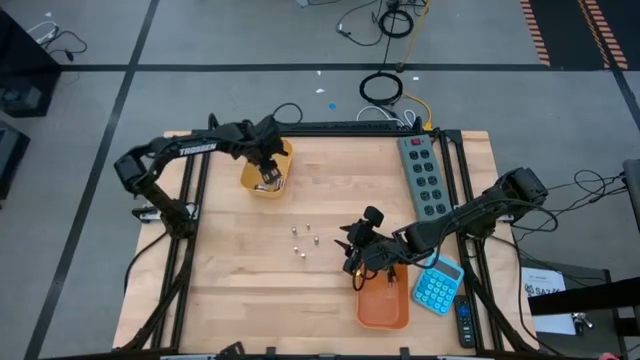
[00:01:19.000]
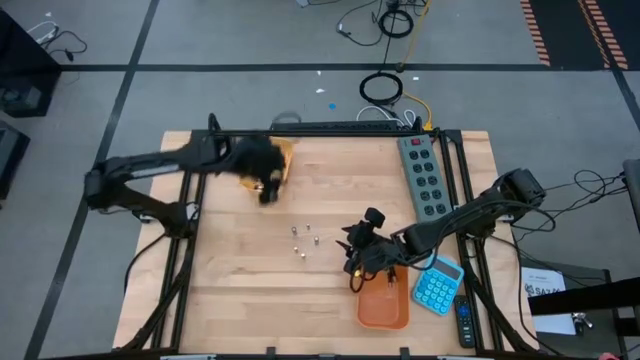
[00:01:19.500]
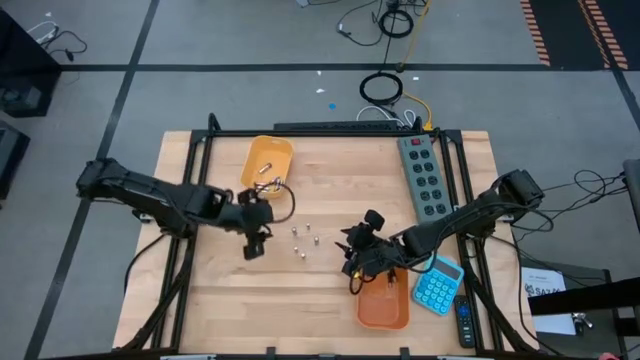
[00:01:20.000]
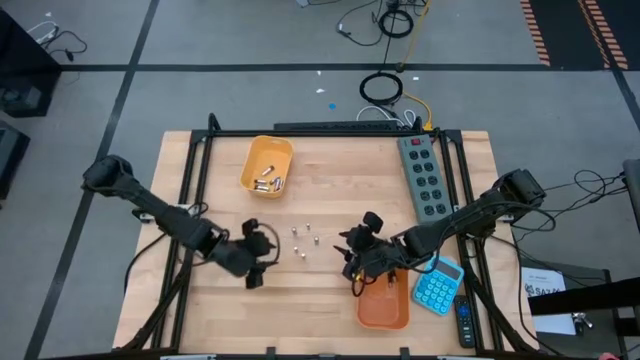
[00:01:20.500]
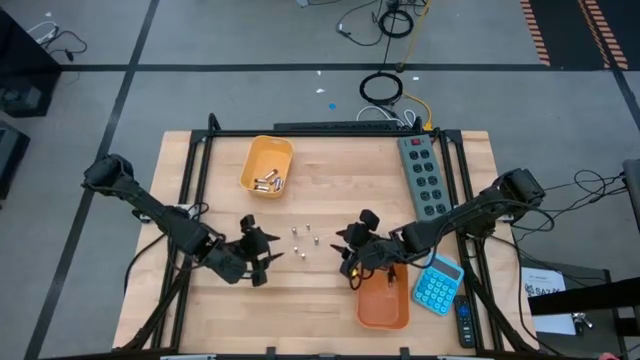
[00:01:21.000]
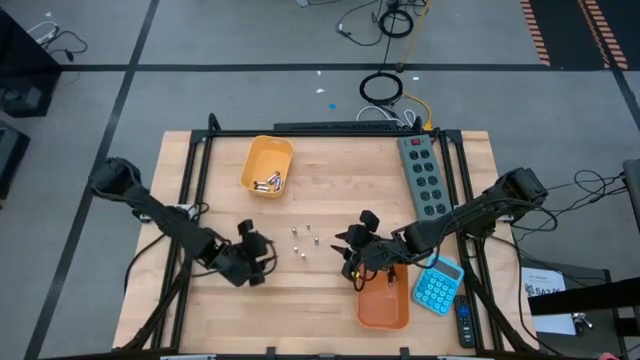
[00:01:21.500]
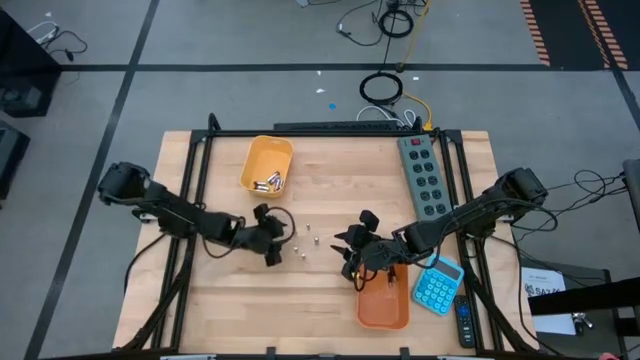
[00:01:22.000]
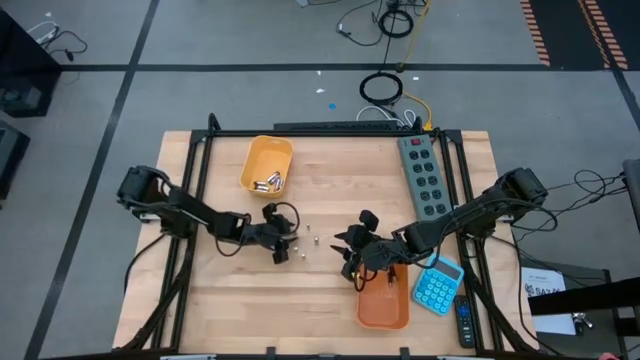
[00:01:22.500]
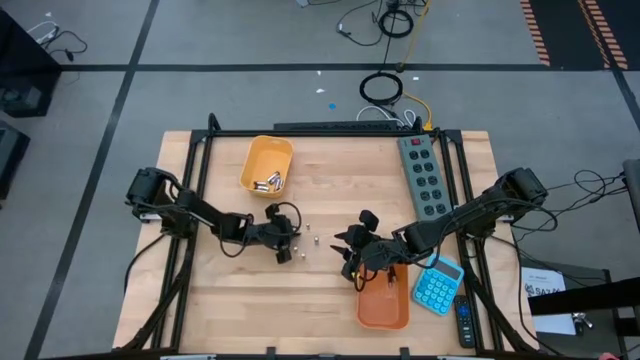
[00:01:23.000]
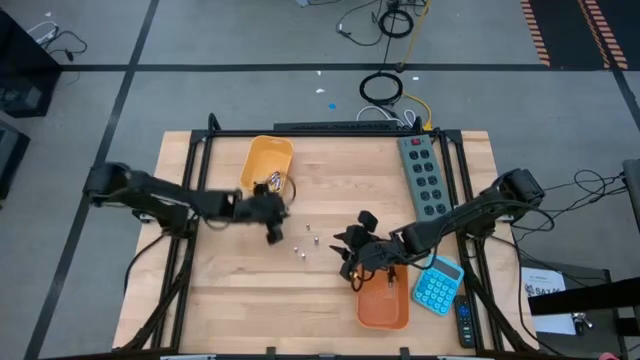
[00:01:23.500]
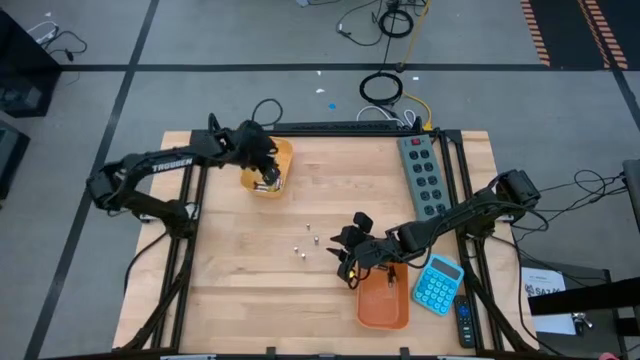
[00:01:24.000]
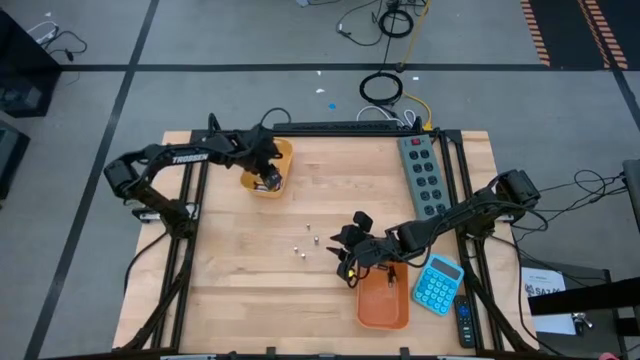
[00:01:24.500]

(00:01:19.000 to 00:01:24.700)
Task: Sort batteries
Put the silver battery into the yellow bin

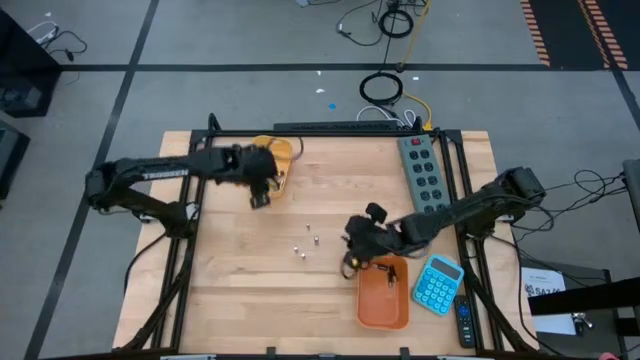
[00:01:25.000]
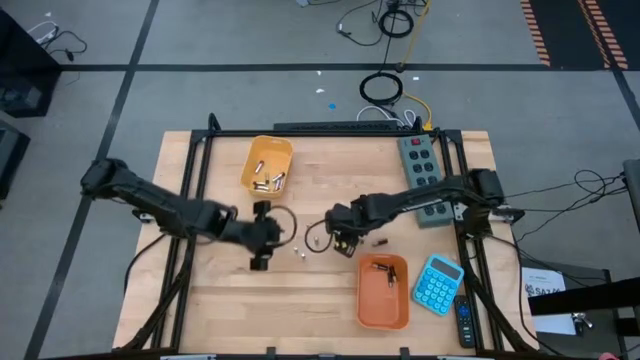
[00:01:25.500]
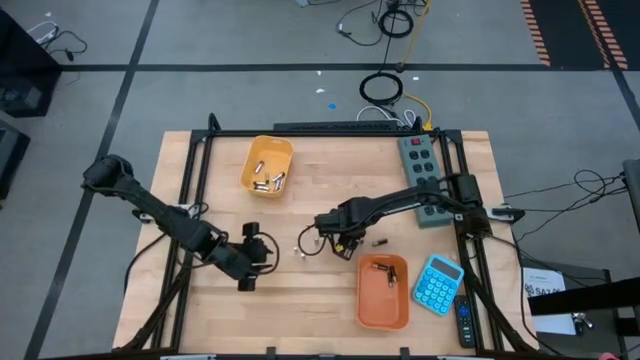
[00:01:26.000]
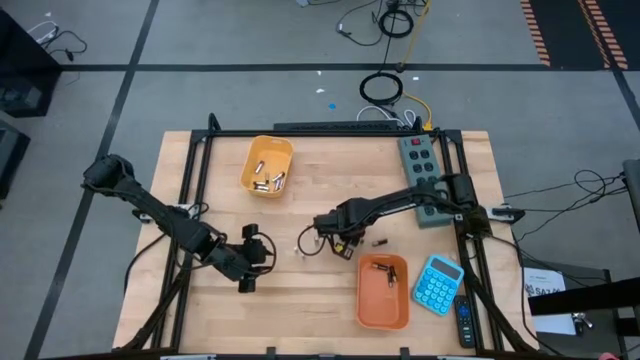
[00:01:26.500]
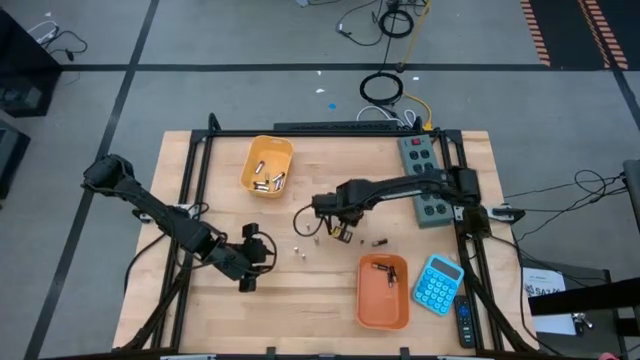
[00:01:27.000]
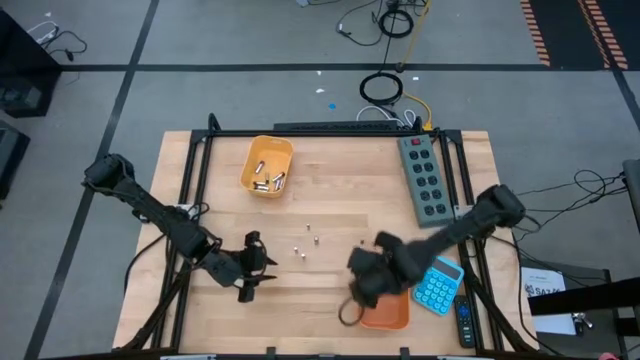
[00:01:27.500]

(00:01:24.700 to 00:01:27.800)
Put the black battery into the orange bin

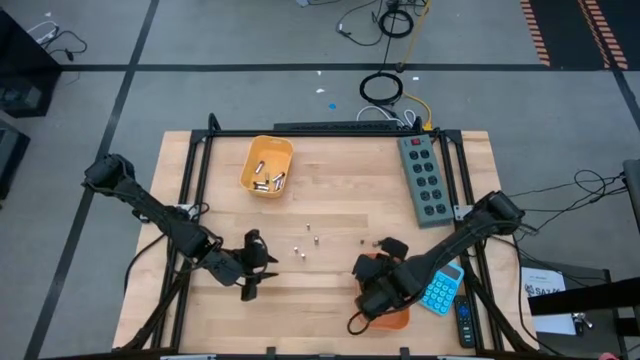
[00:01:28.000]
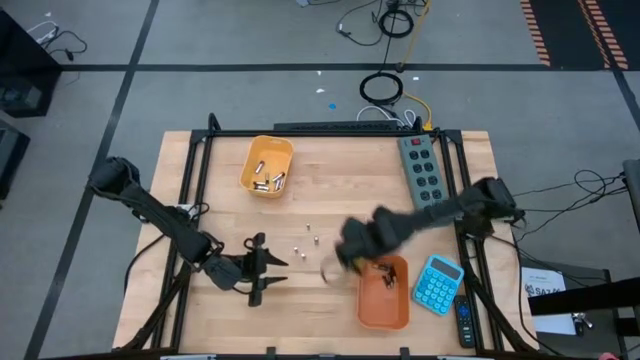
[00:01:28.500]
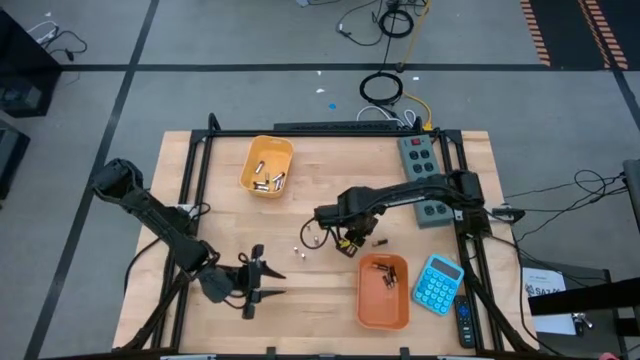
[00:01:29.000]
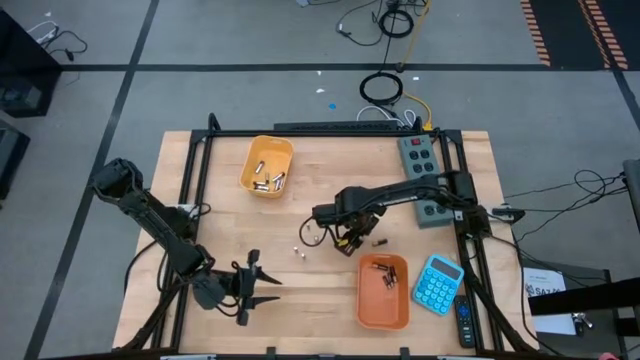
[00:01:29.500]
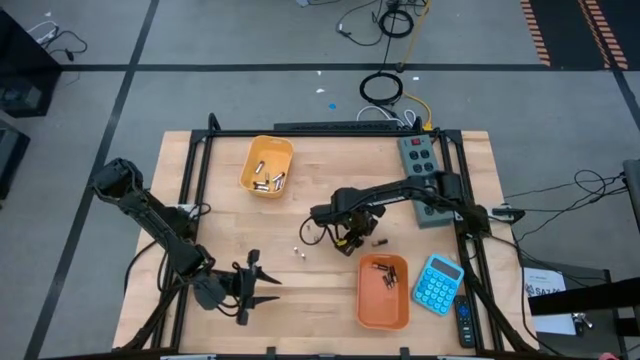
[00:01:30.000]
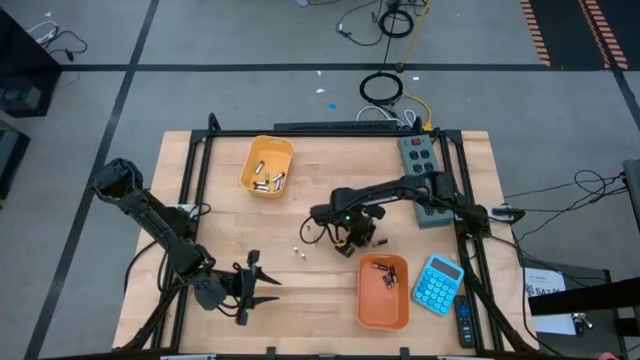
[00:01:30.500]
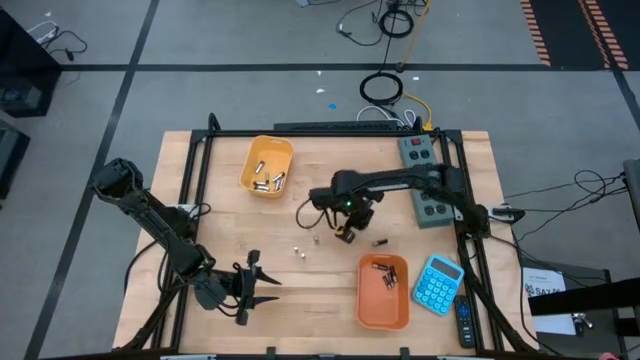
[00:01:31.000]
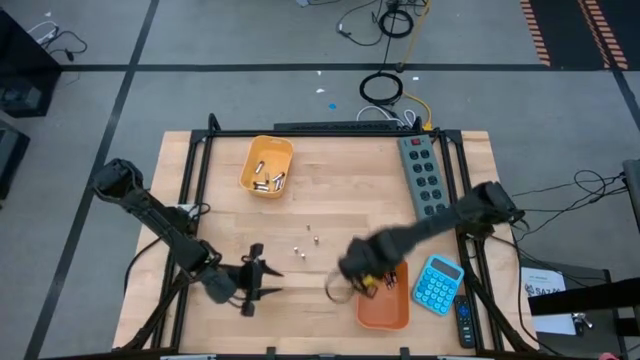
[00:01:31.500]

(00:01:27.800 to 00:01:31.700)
Put the black battery into the orange bin

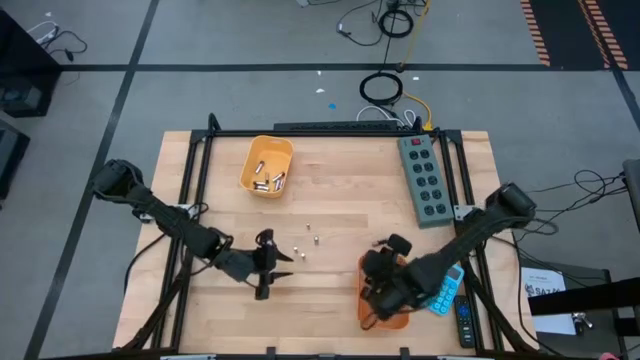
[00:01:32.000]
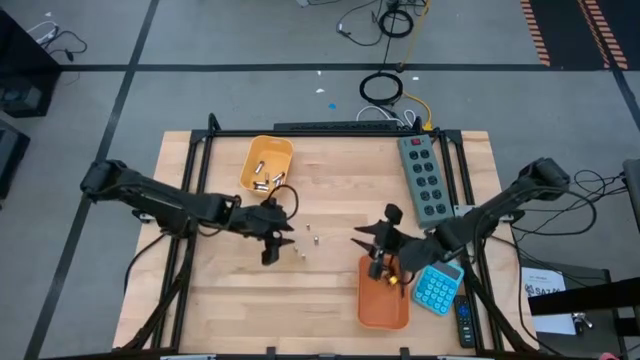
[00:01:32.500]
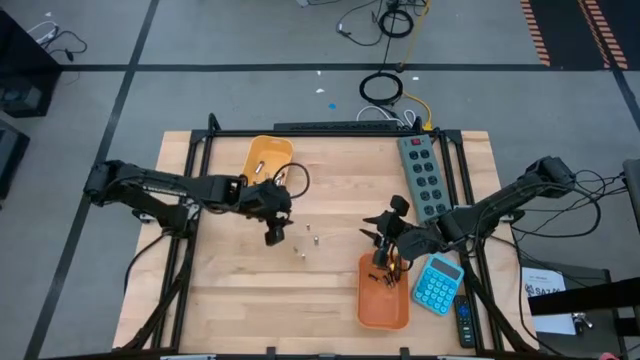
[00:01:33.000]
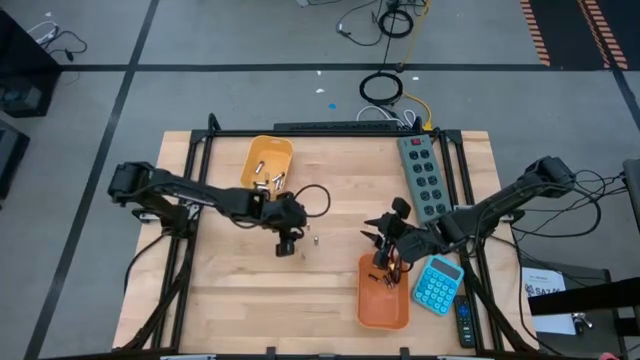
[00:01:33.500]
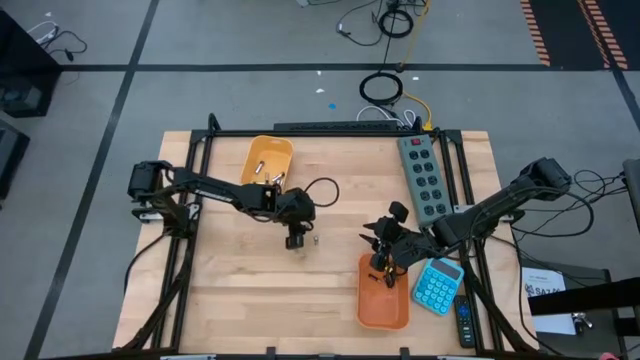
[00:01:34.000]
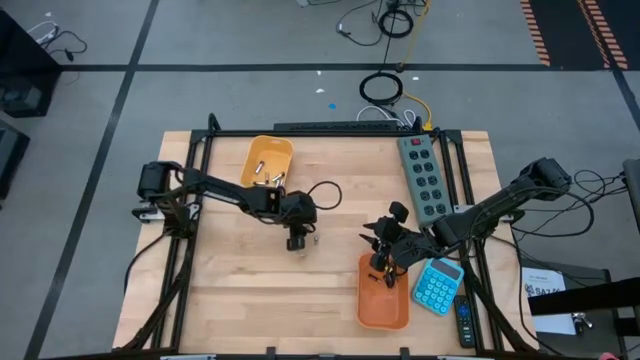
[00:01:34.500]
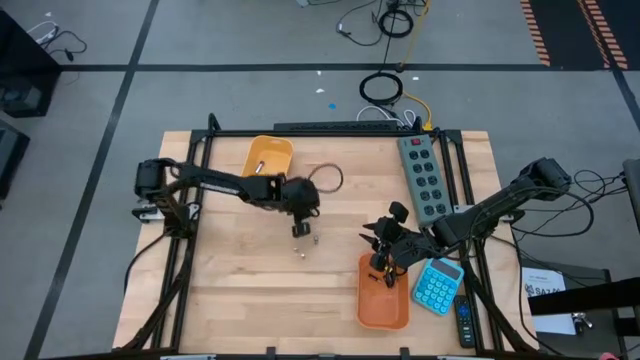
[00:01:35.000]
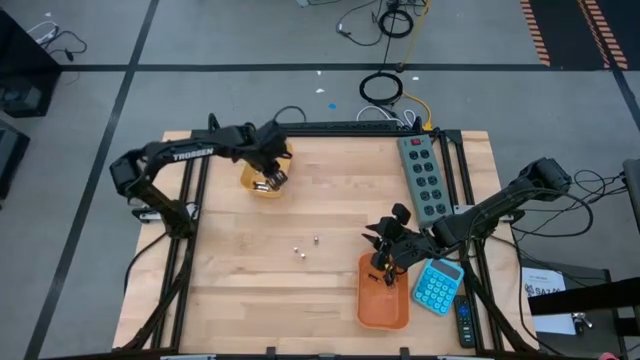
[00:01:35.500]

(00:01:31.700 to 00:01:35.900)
Put the silver battery into the yellow bin

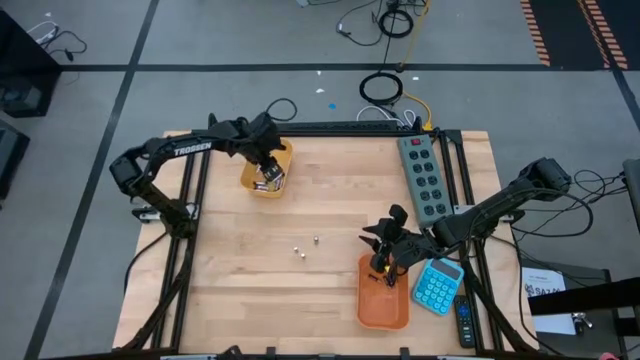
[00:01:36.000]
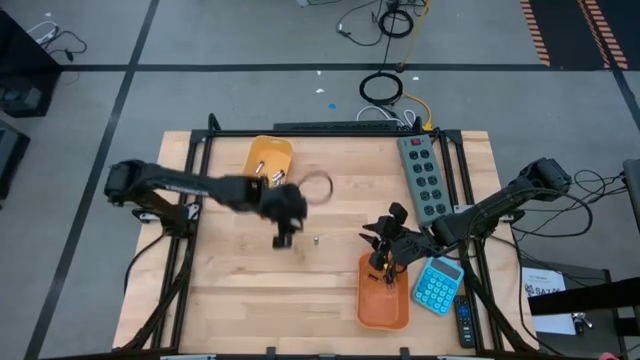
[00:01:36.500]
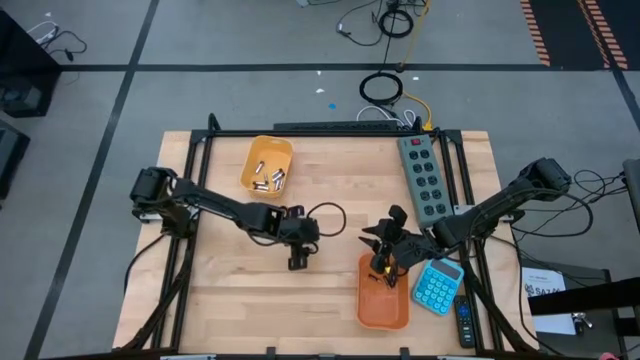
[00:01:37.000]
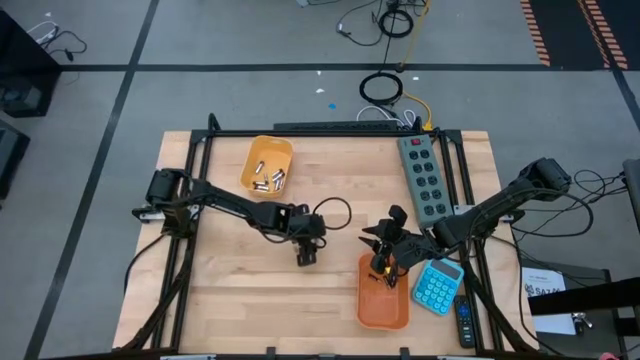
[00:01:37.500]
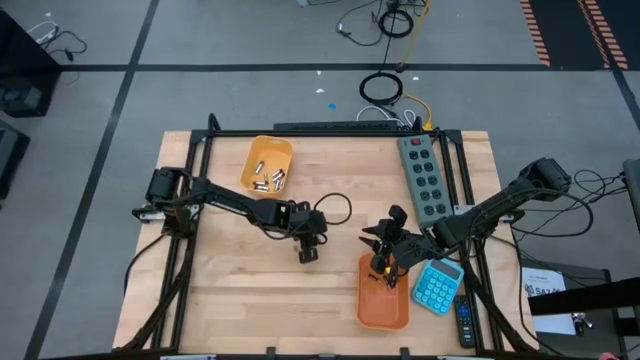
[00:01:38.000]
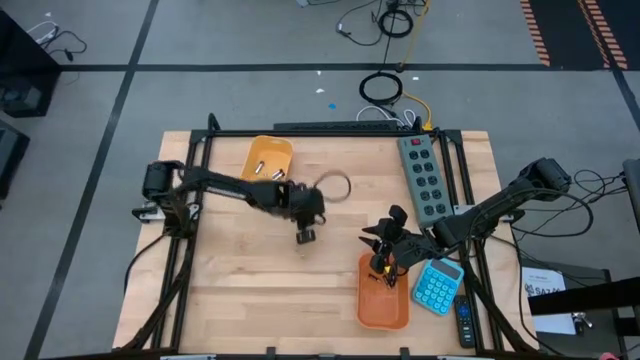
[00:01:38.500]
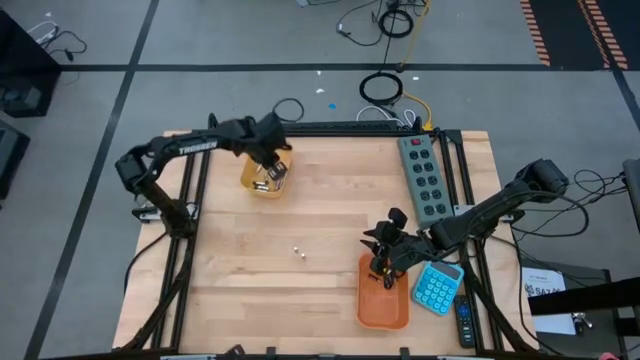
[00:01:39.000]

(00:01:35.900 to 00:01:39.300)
Put the silver battery into the yellow bin
